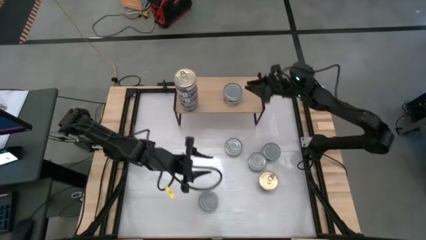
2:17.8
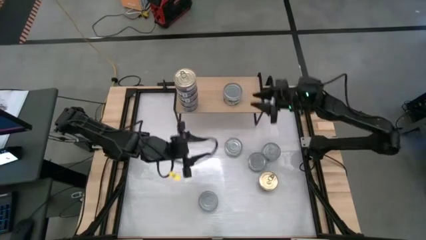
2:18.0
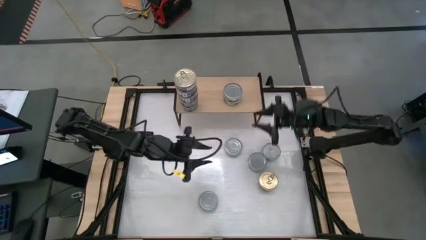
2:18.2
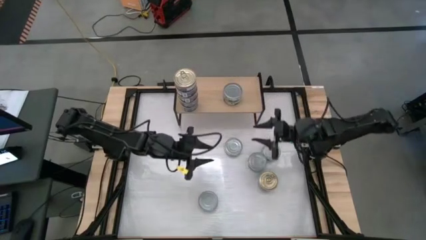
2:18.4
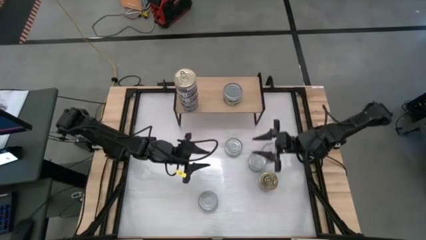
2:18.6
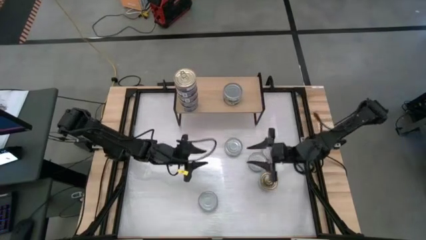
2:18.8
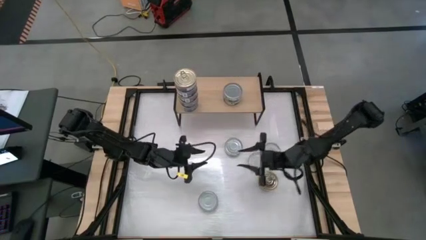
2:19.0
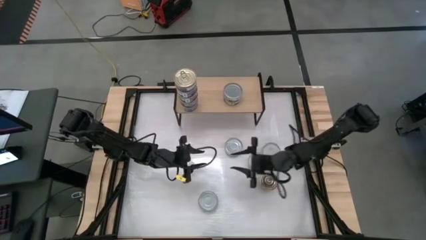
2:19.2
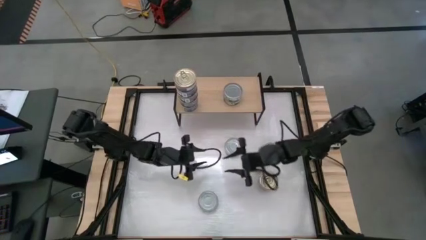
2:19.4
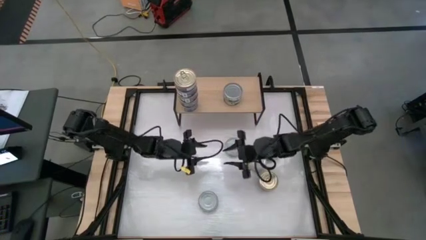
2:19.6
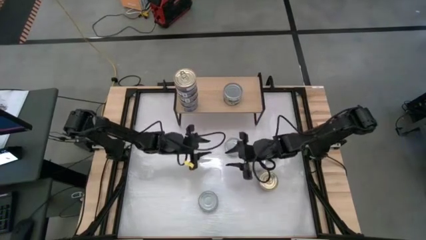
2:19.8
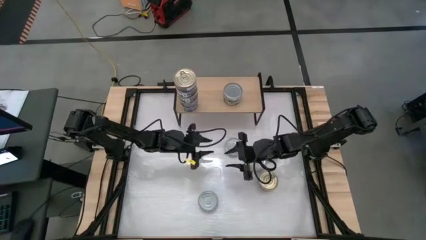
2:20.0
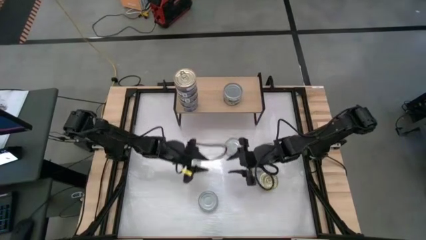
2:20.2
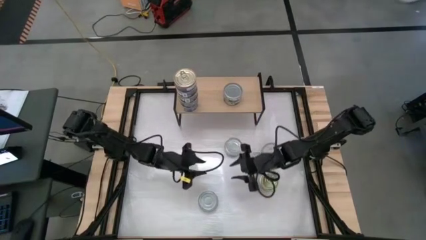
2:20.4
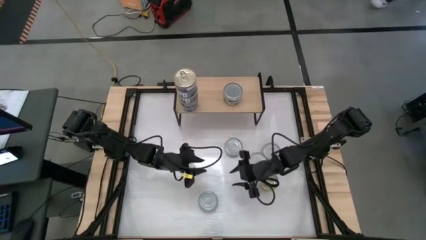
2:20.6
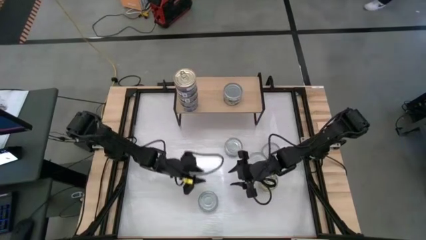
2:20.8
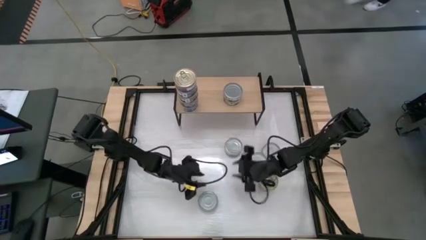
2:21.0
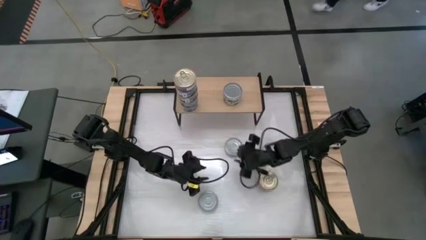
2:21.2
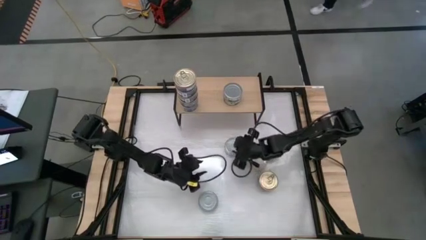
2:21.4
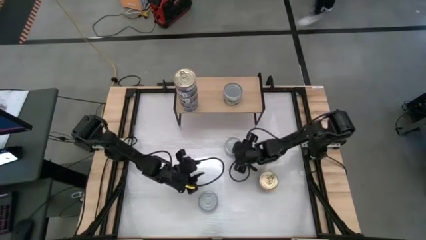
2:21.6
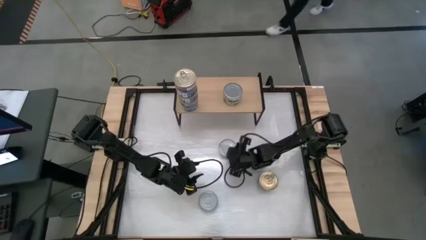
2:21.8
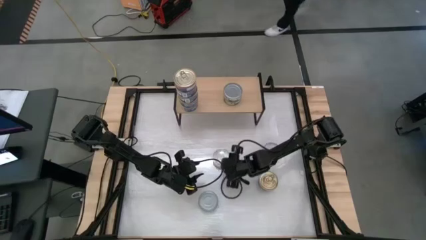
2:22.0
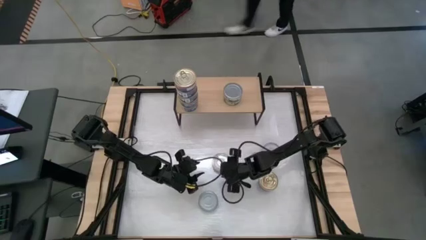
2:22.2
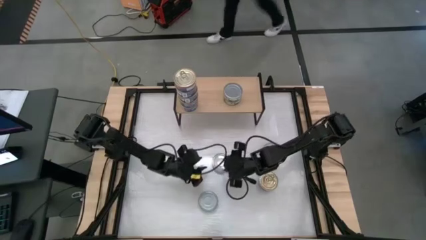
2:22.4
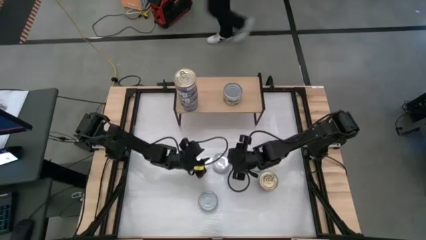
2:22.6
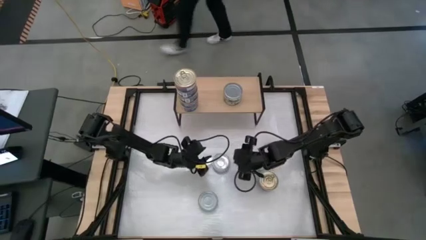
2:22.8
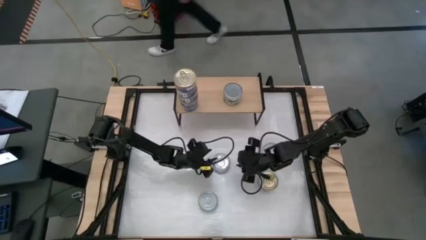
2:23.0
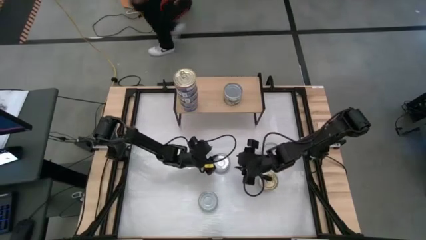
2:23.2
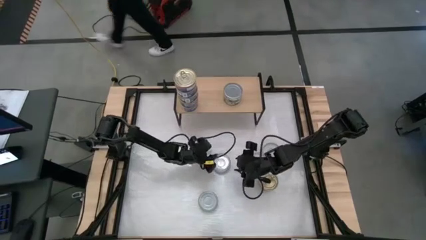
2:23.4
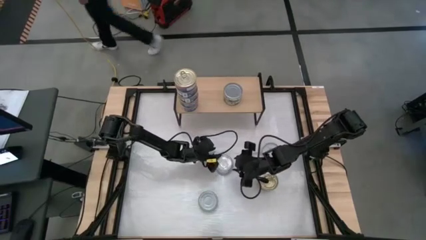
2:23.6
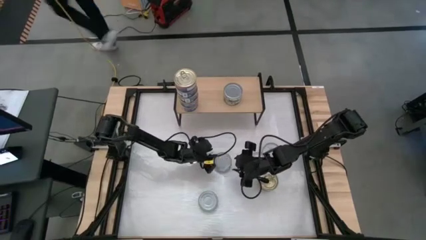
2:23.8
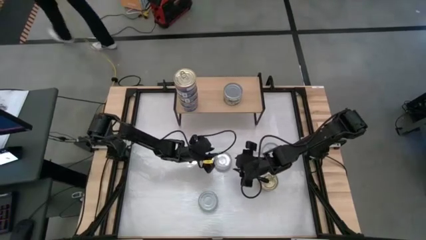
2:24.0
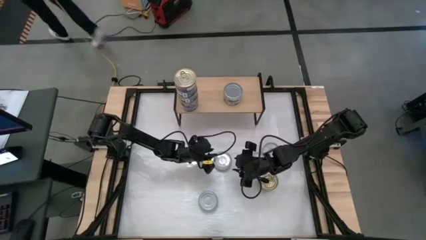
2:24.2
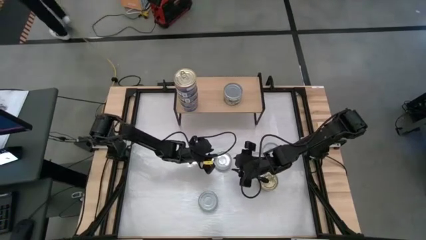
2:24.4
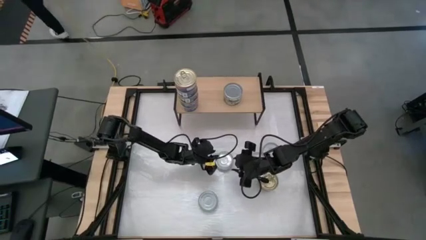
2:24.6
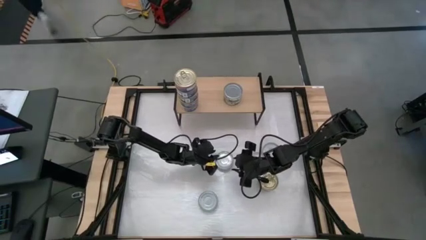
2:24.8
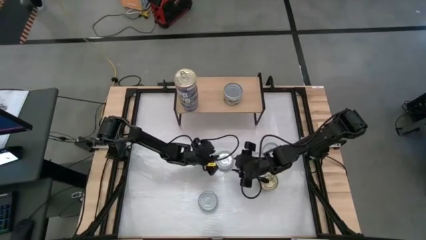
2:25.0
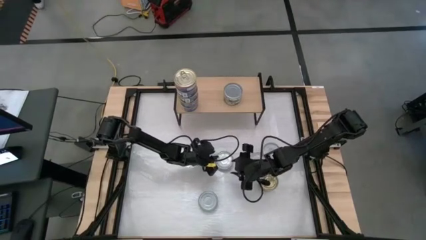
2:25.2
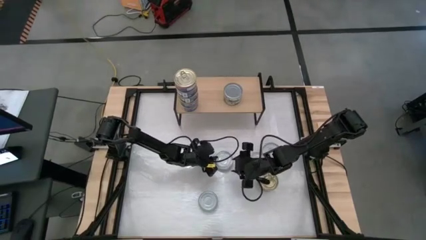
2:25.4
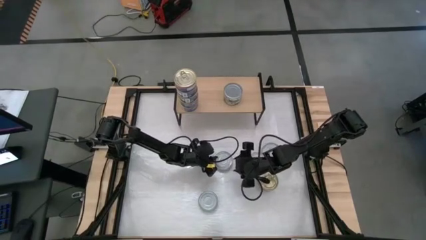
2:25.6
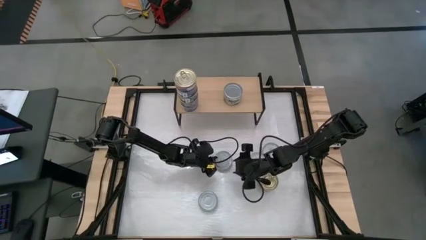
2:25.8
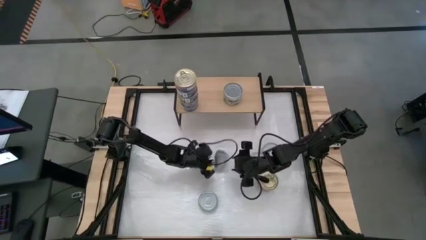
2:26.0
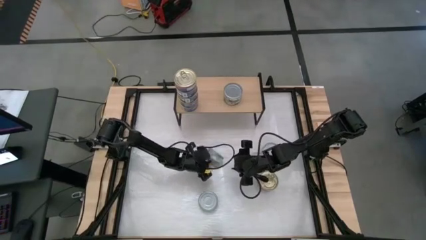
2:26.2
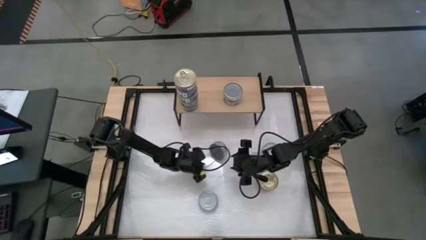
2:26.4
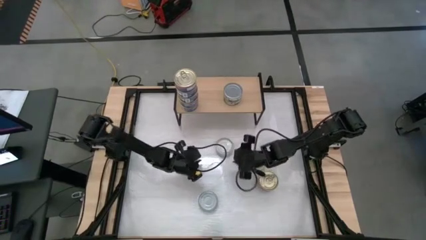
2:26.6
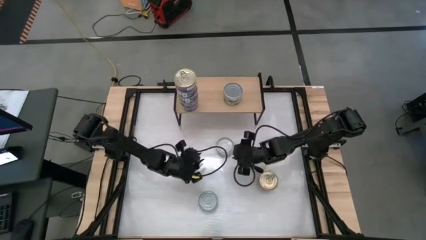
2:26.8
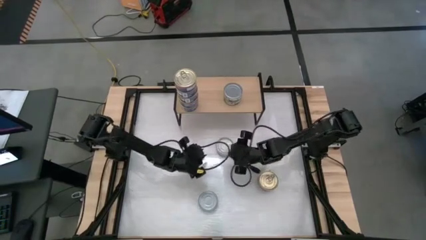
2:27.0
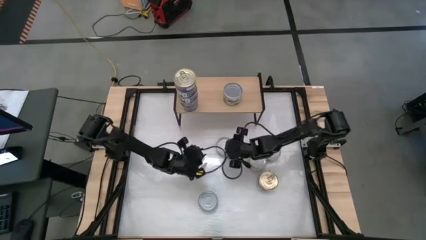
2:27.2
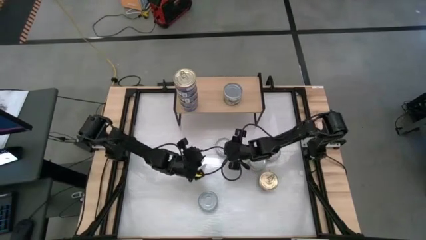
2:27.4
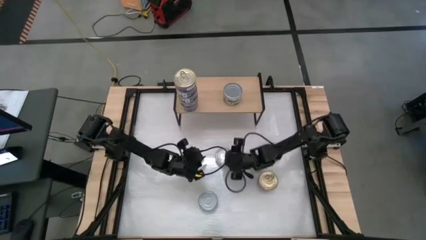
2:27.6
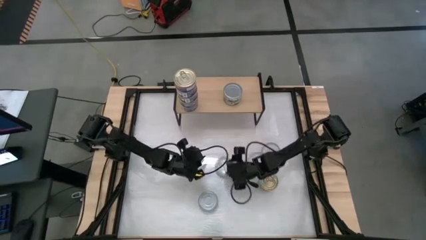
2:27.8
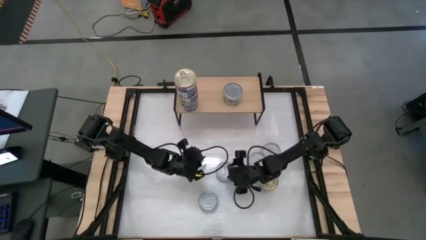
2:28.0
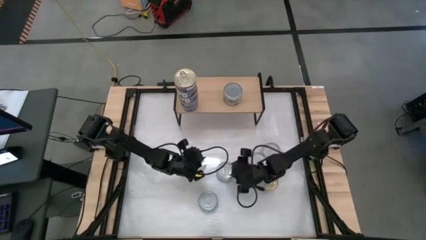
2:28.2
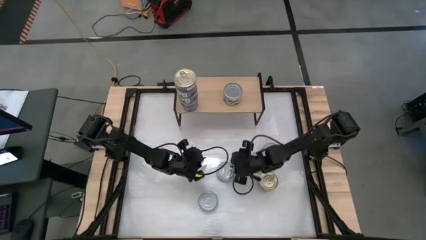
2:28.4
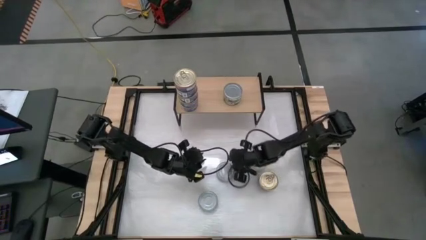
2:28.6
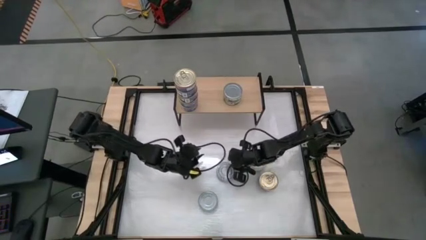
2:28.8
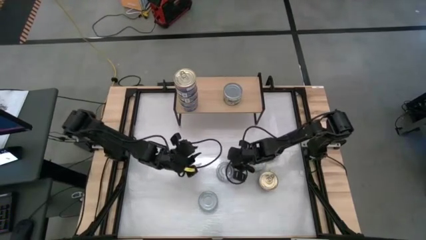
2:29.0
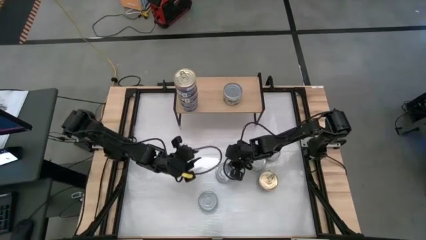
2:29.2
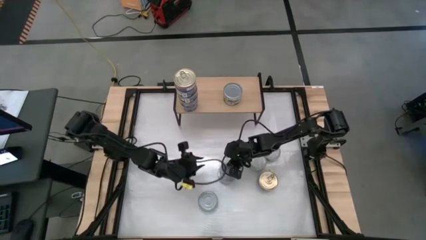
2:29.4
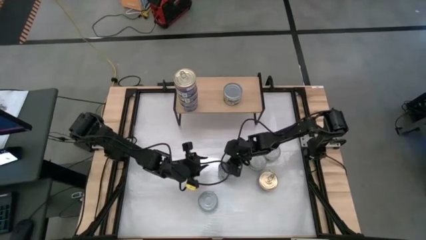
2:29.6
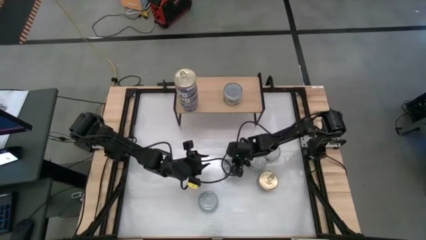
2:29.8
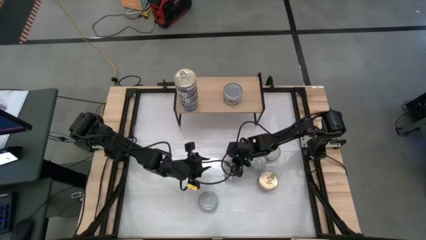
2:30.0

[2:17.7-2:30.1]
Task: Stack canned seafood by type on shelf
Stack the green tuna can on top of the other green tuna cans on the shelf

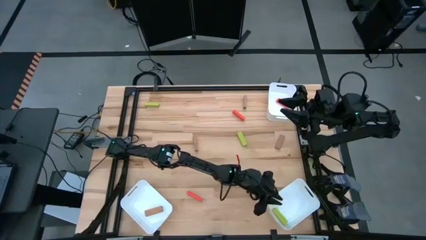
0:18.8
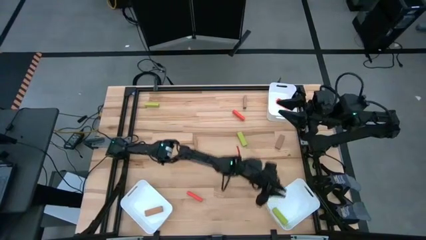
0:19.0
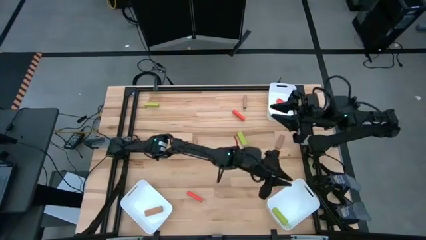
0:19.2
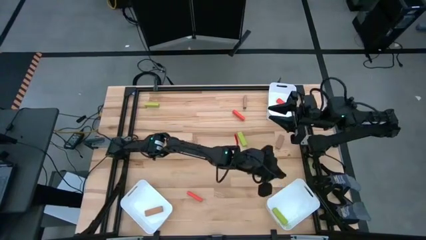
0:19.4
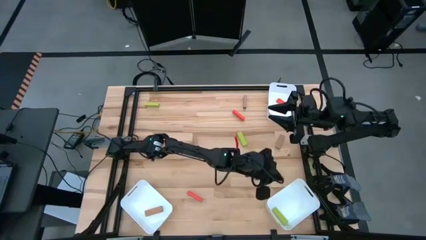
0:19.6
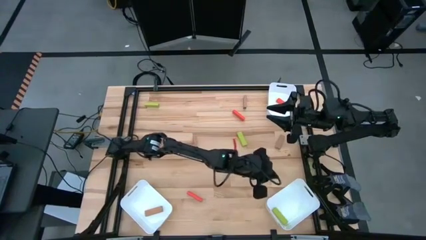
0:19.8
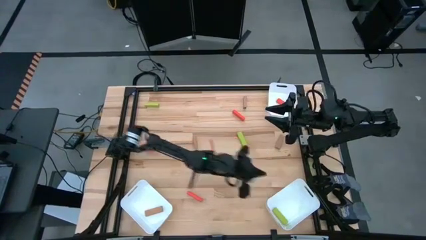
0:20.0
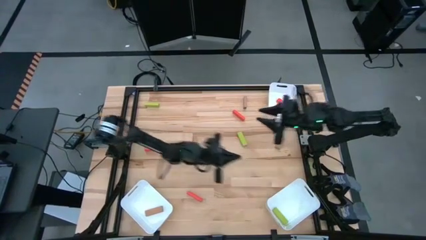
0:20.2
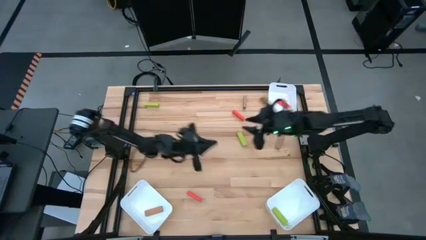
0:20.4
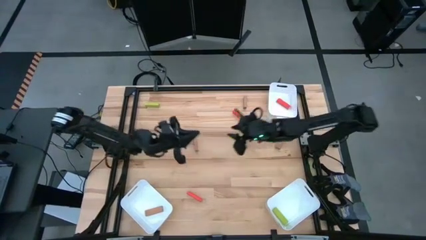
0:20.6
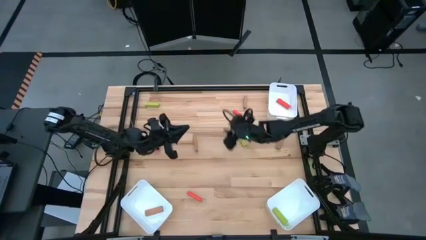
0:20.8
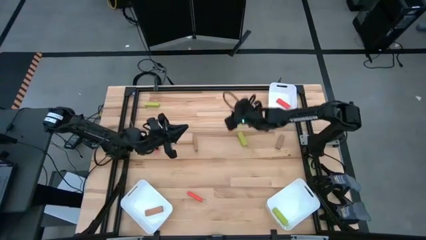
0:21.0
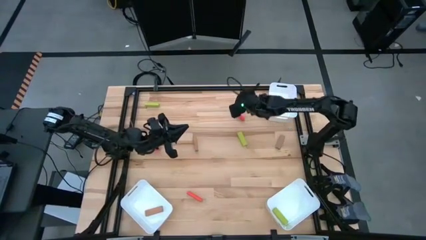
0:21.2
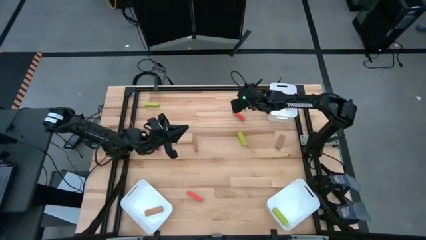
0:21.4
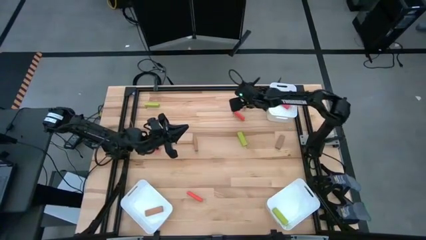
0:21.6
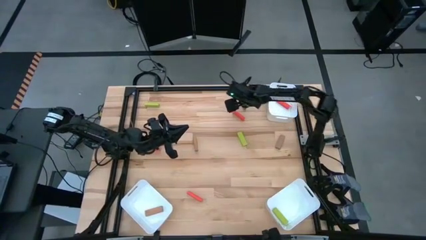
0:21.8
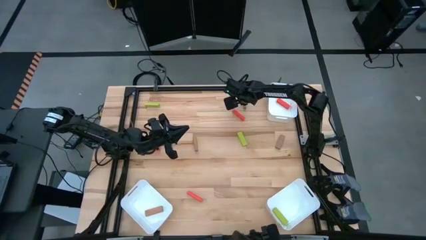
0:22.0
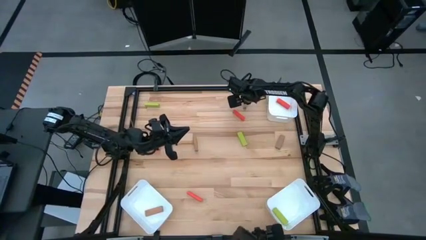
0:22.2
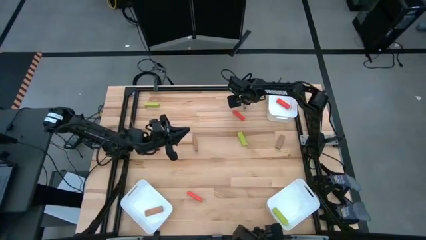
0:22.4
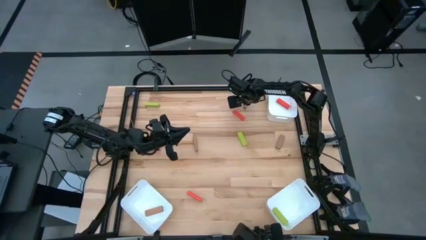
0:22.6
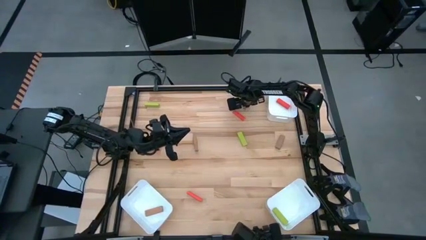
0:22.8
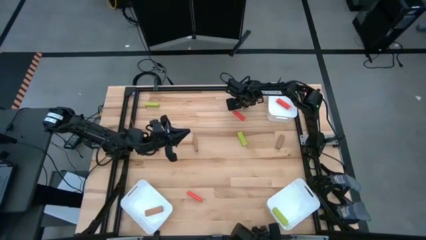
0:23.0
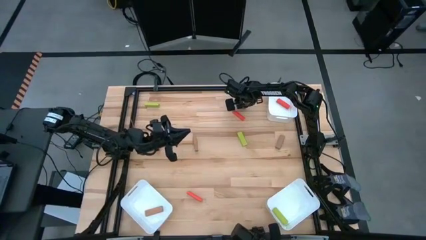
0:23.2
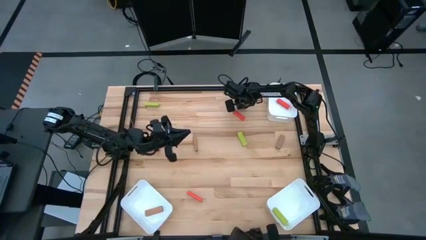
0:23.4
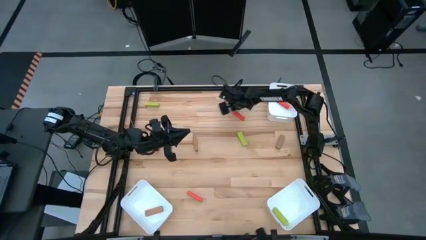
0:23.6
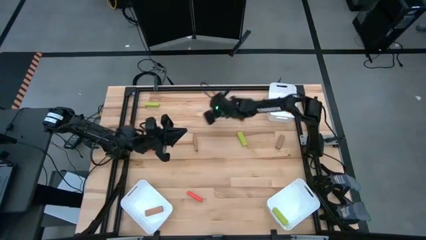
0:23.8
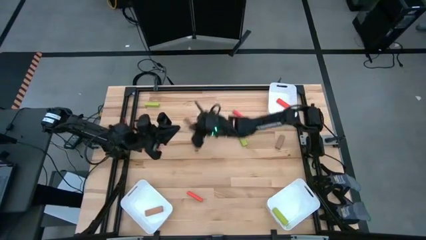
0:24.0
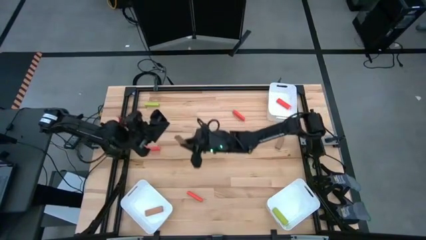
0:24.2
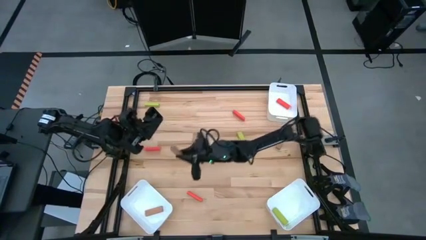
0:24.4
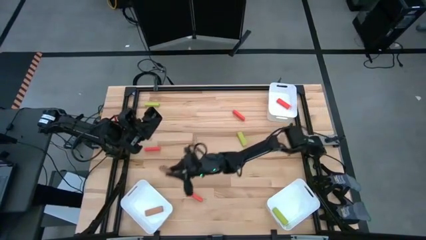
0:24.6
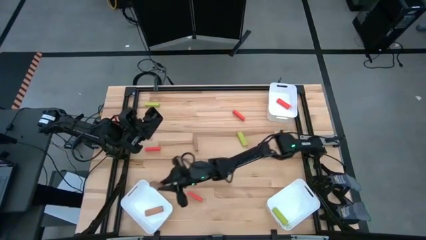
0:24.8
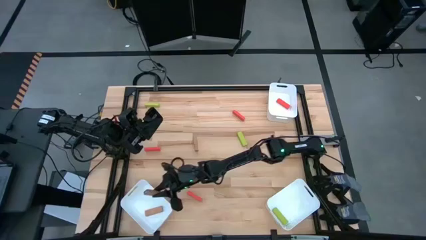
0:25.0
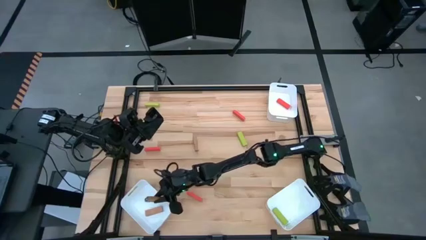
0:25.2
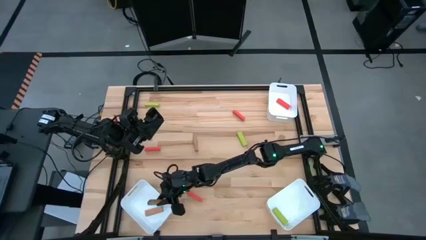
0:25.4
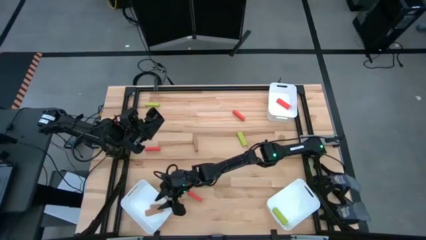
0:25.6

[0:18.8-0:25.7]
Task: Sort blocks
Put the top brown block into the bottom left bin
